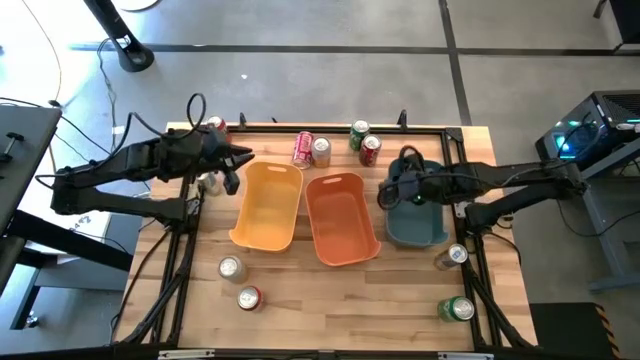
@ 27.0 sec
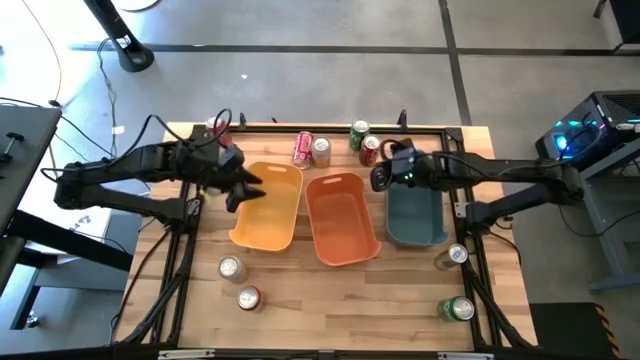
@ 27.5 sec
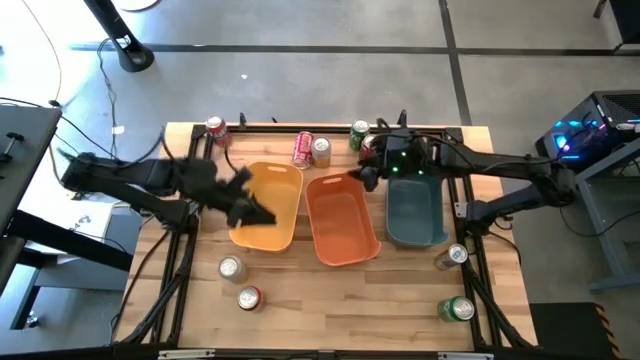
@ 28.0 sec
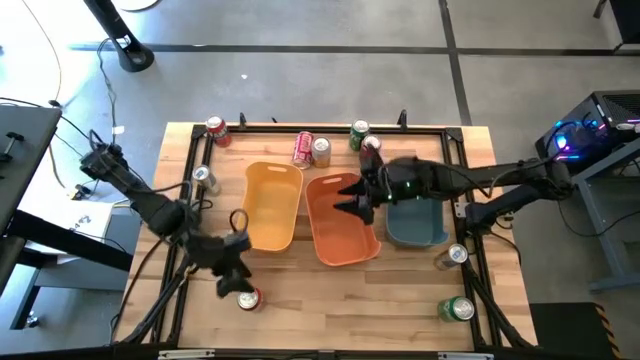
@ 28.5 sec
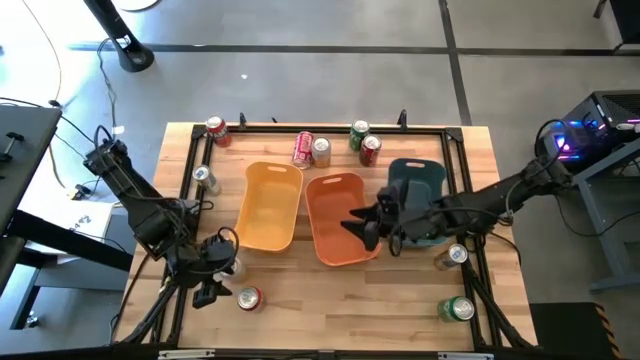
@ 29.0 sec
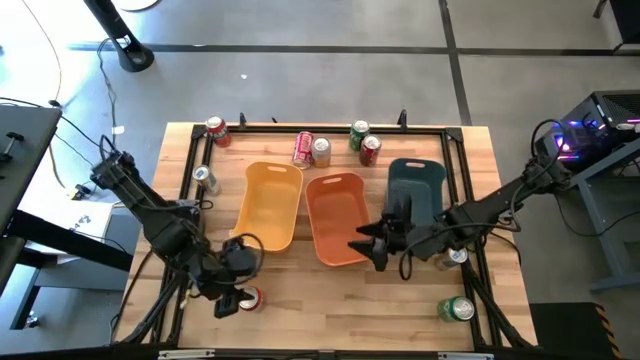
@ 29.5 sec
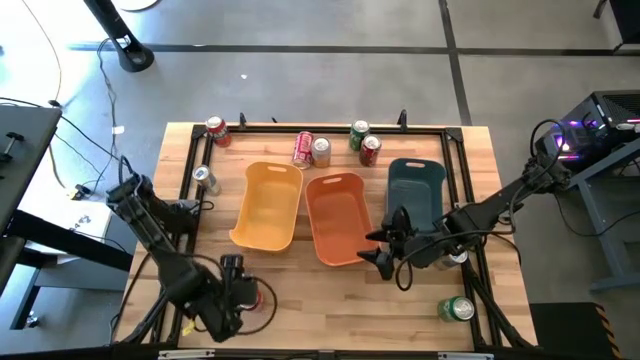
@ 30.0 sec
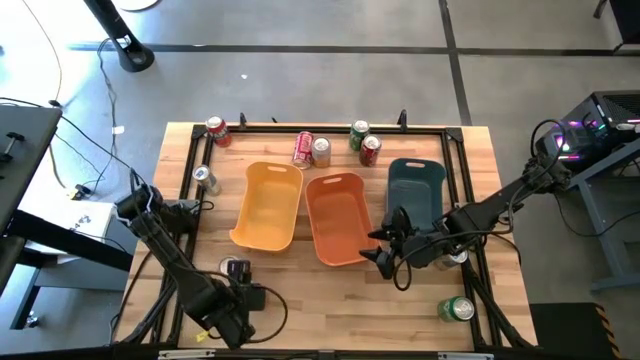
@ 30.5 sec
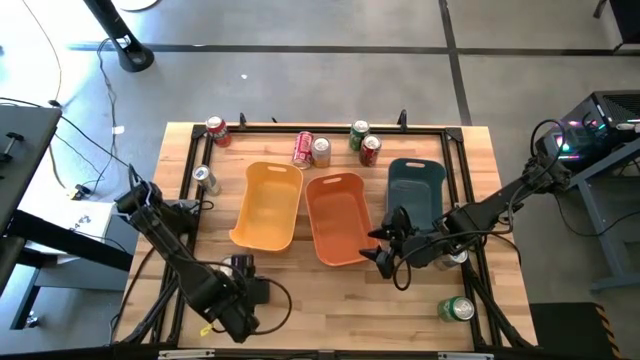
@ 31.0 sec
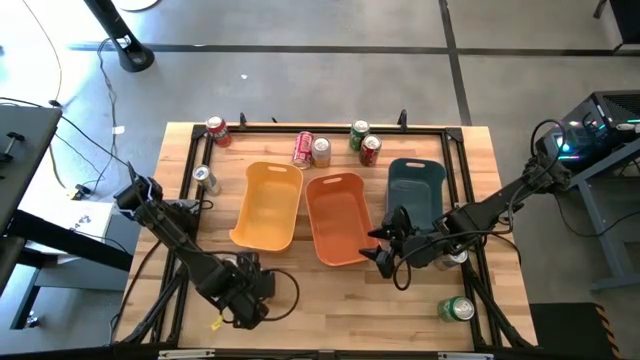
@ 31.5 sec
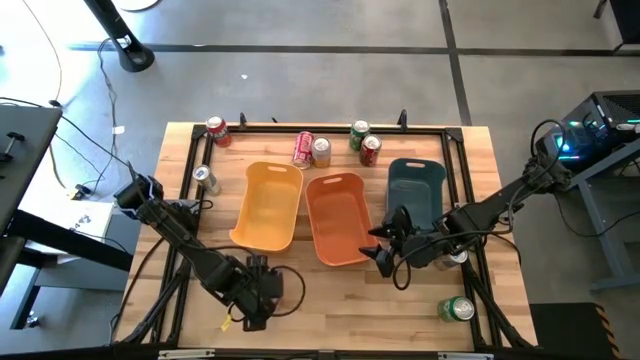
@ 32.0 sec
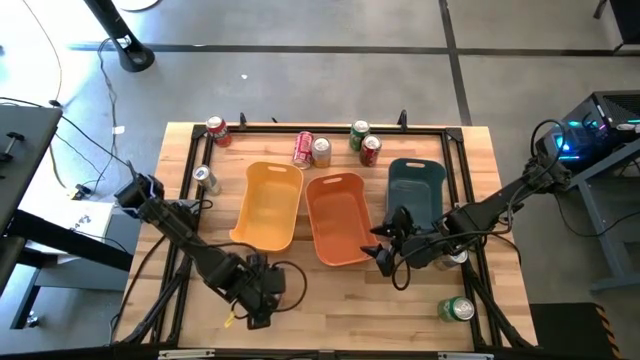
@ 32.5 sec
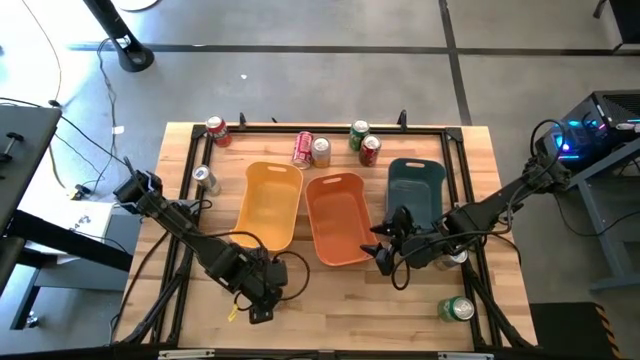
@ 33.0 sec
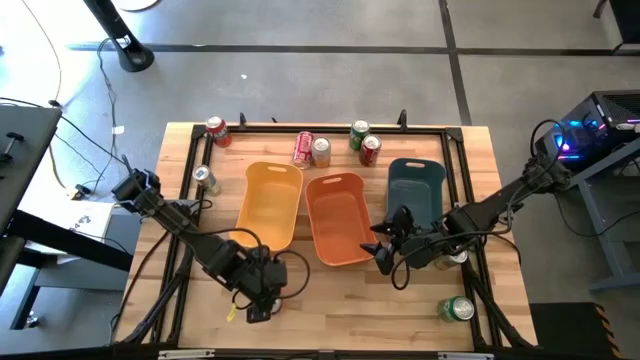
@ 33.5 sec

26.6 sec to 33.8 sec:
Task: Sort soda cans
Put the bottom orange soda can into the yellow bin

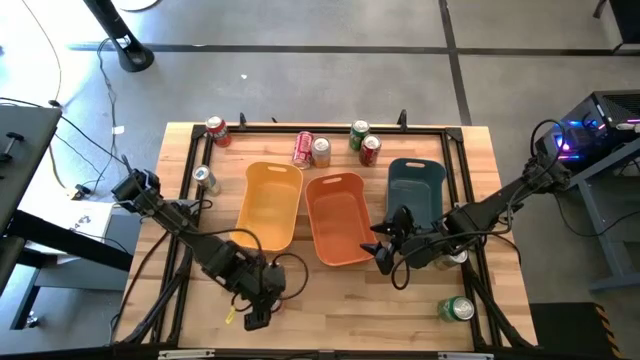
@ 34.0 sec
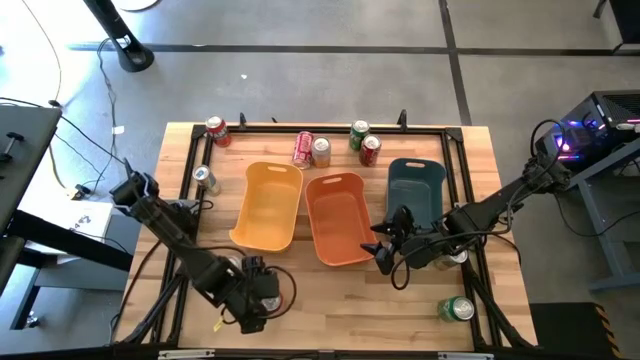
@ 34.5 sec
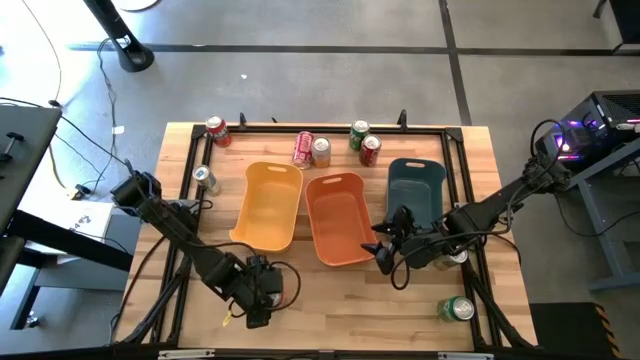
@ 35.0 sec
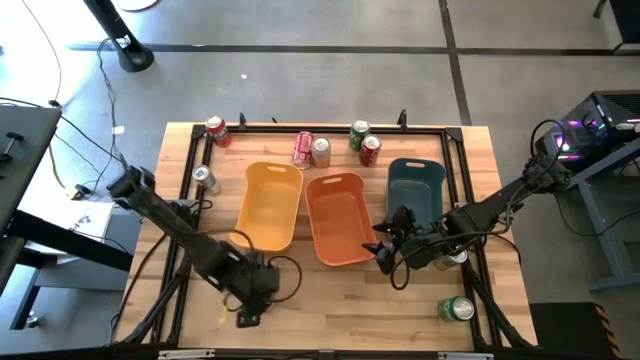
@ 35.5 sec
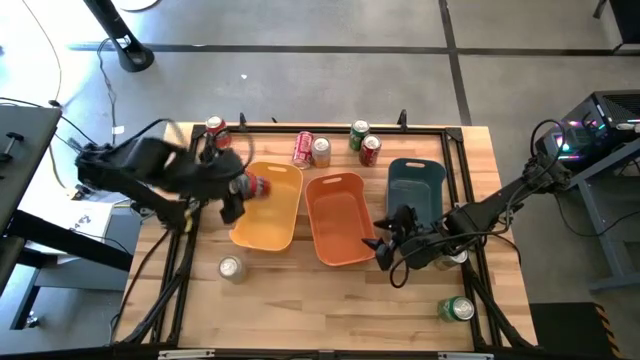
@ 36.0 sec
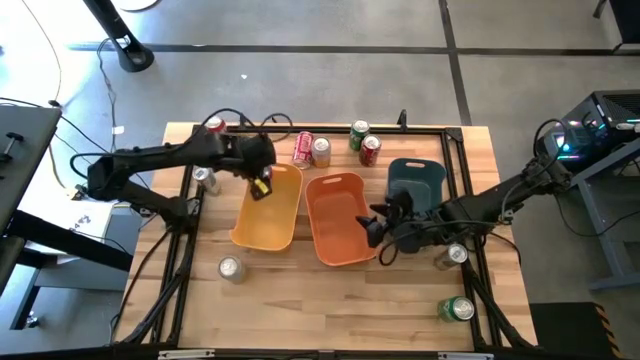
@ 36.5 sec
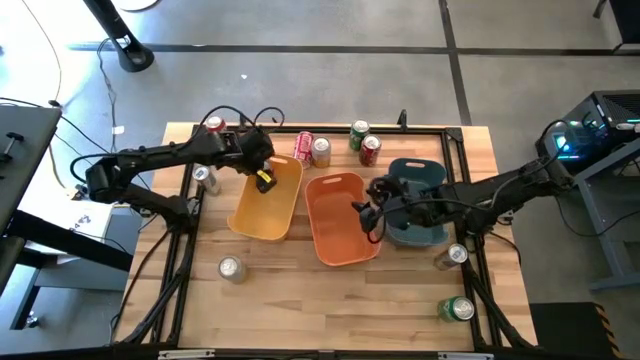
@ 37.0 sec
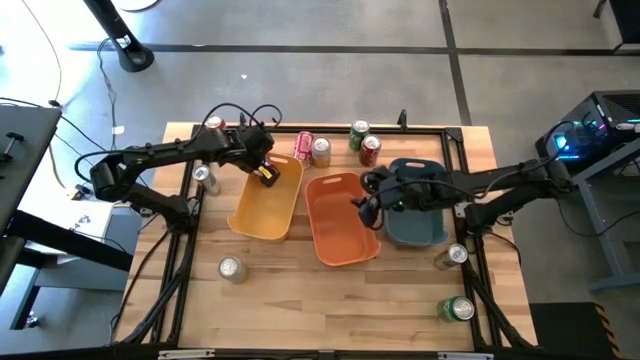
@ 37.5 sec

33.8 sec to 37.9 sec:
Put the bottom orange soda can into the yellow bin

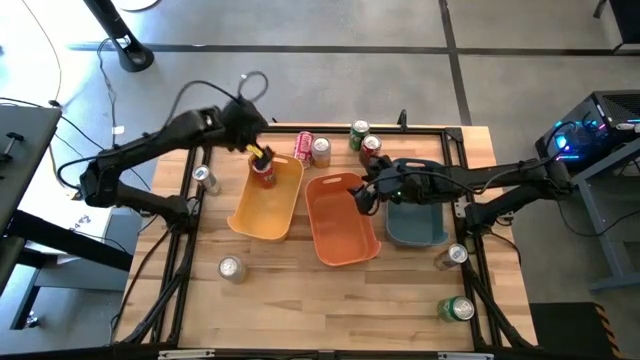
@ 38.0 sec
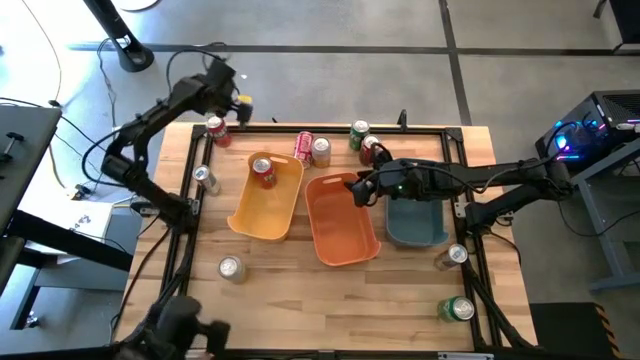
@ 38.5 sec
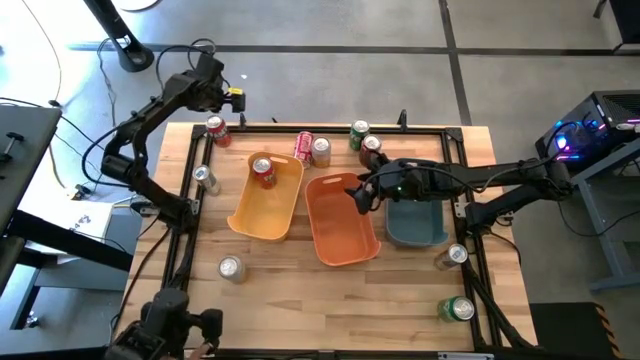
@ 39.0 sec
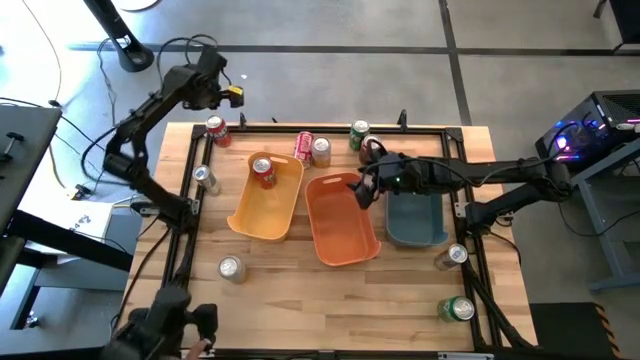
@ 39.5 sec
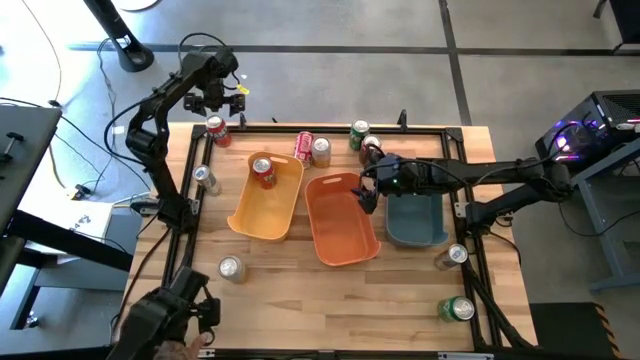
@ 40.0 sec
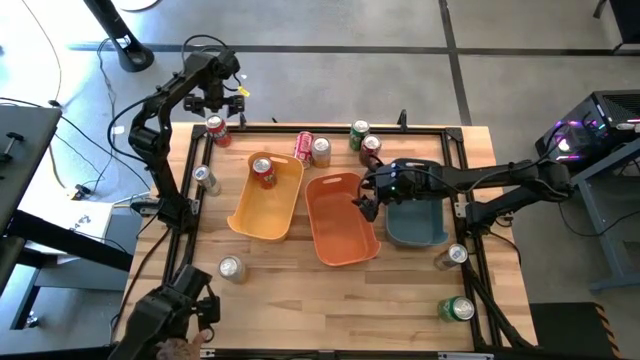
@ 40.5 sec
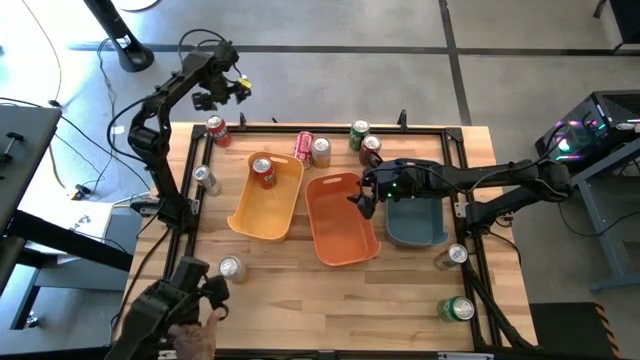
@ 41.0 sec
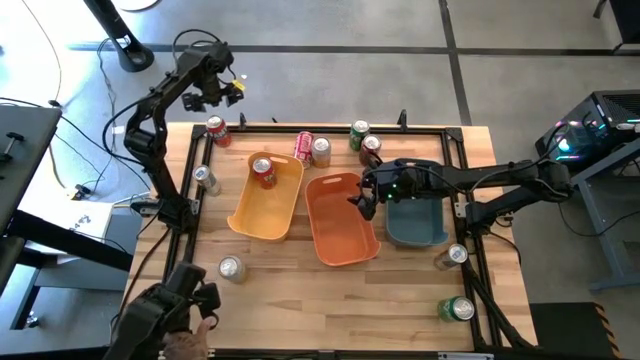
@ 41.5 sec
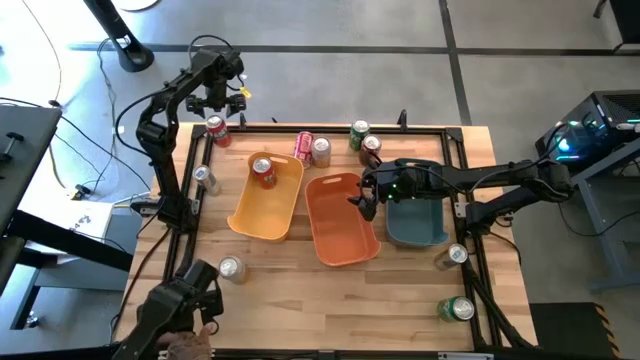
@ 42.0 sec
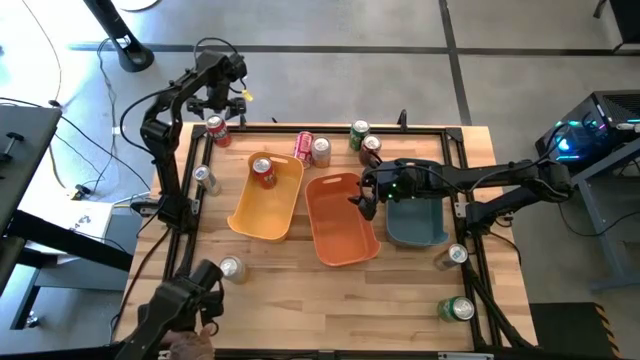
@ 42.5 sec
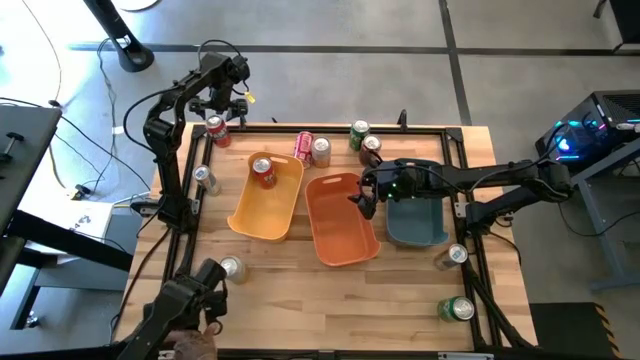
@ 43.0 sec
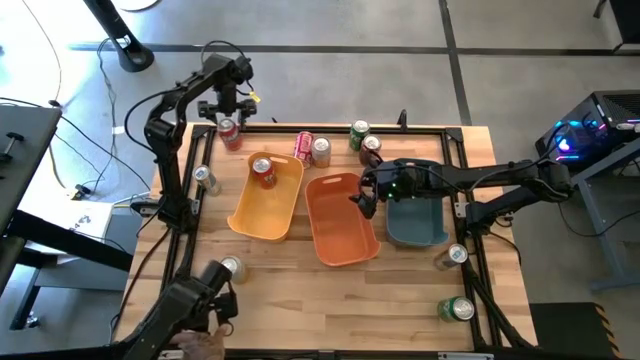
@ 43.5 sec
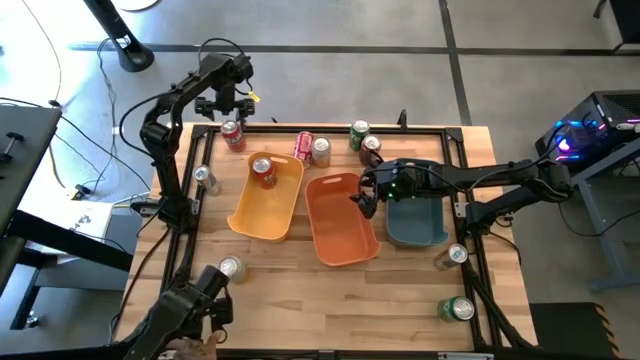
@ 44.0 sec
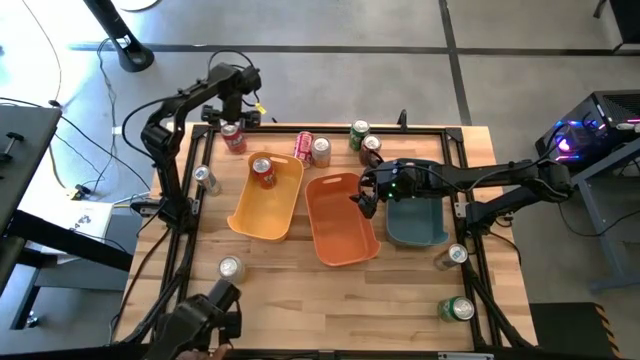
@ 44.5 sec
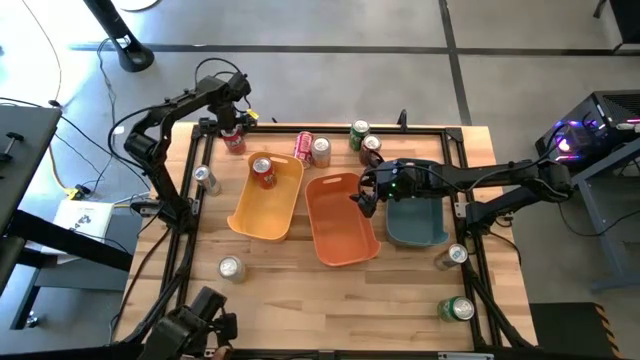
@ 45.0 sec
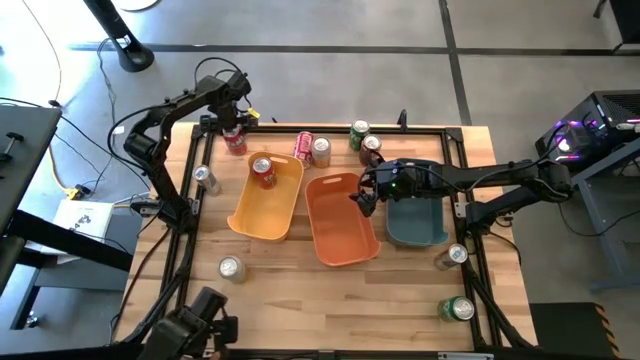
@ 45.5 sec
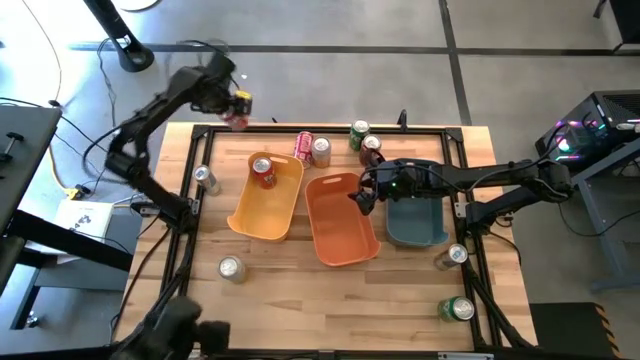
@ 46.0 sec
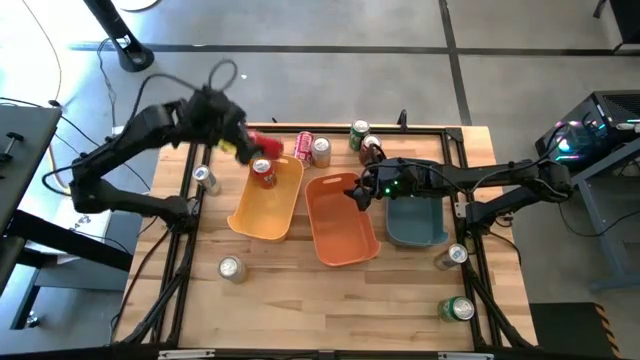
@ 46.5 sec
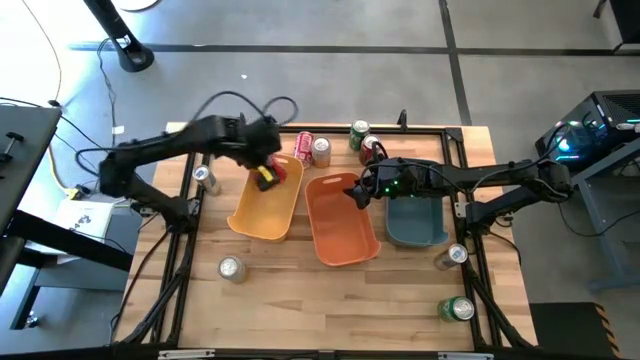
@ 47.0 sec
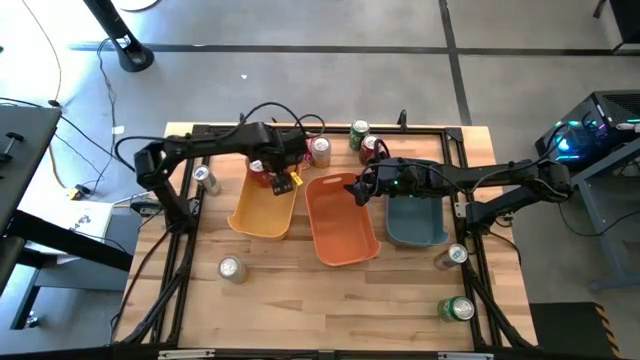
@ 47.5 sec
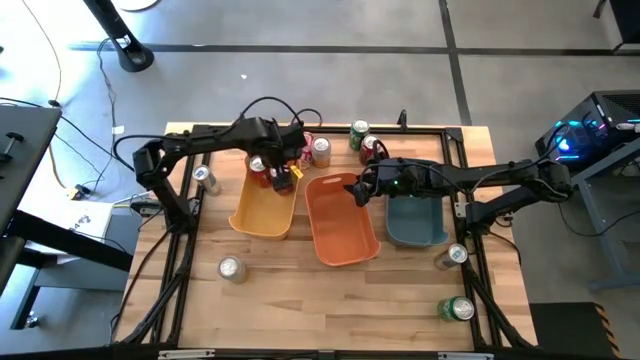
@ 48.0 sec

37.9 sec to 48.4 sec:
Put the orange soda can into the yellow bin
